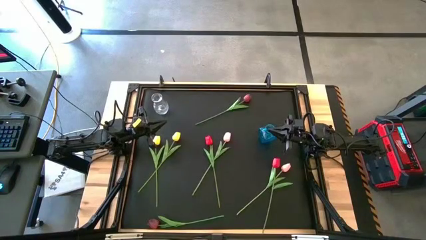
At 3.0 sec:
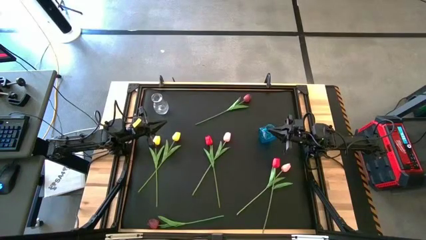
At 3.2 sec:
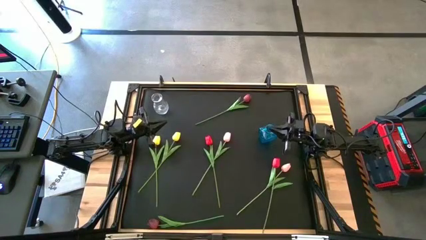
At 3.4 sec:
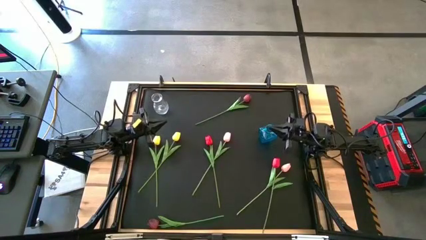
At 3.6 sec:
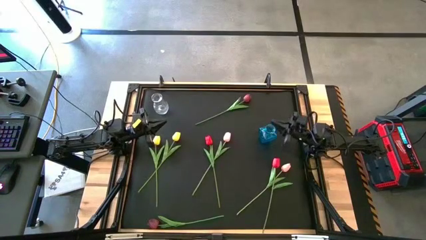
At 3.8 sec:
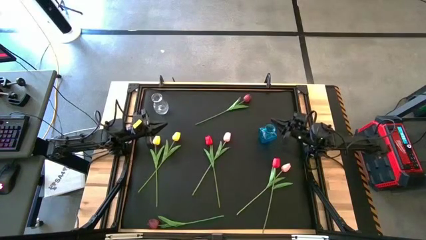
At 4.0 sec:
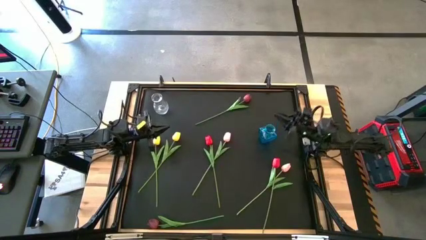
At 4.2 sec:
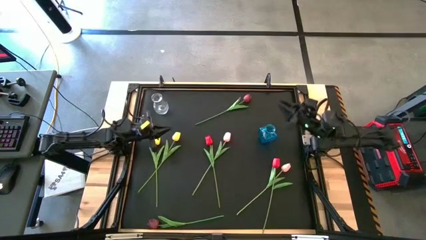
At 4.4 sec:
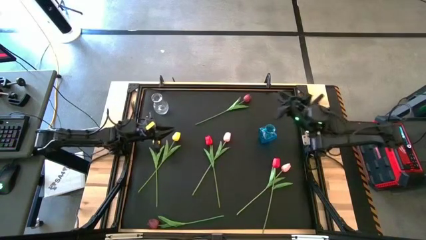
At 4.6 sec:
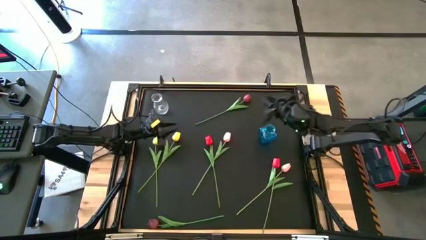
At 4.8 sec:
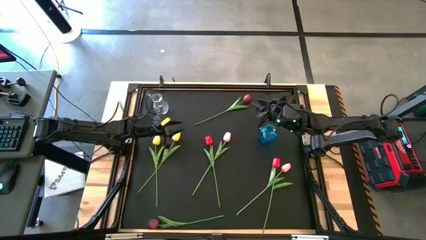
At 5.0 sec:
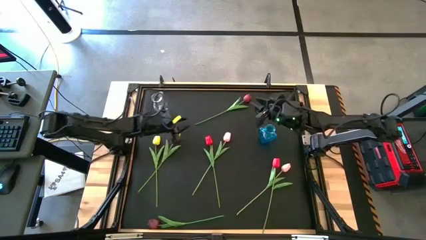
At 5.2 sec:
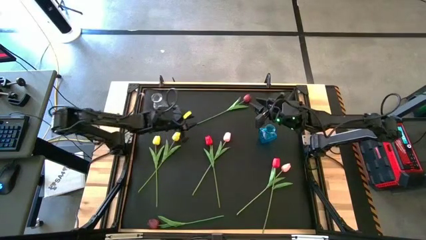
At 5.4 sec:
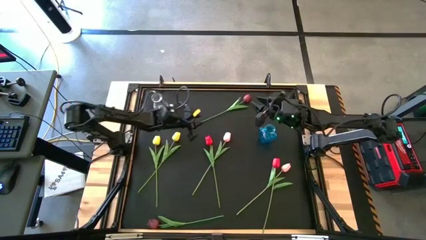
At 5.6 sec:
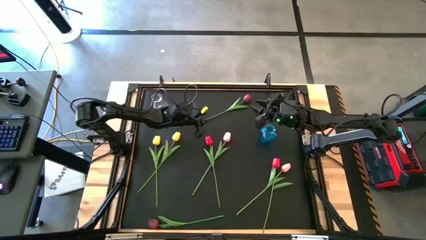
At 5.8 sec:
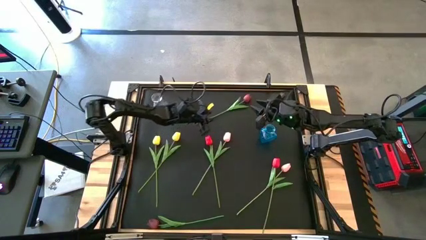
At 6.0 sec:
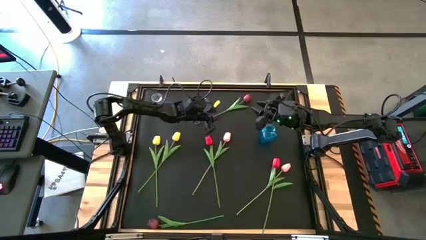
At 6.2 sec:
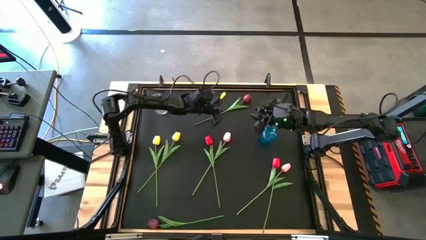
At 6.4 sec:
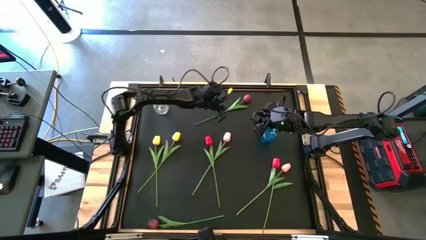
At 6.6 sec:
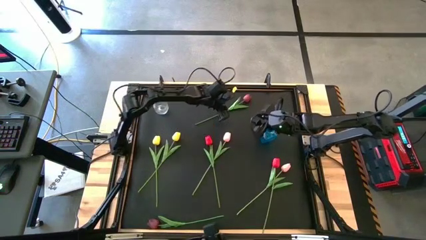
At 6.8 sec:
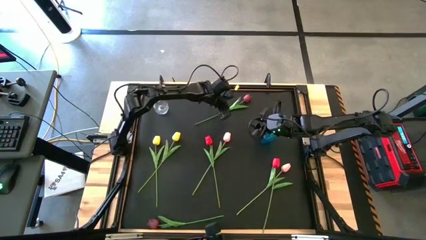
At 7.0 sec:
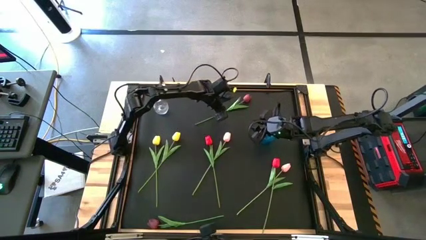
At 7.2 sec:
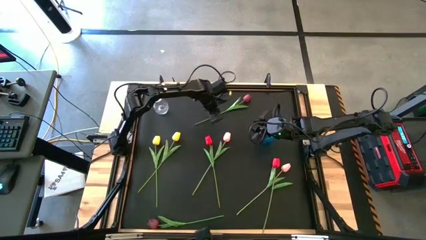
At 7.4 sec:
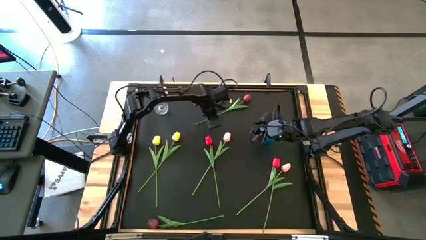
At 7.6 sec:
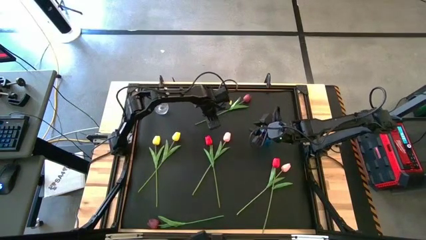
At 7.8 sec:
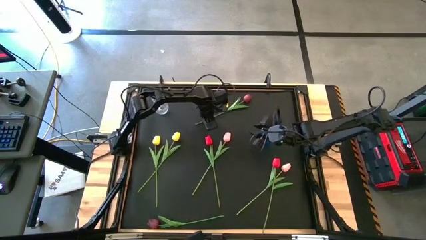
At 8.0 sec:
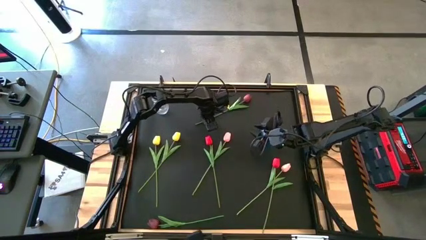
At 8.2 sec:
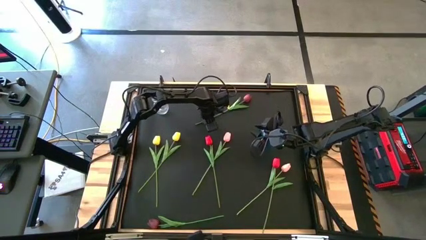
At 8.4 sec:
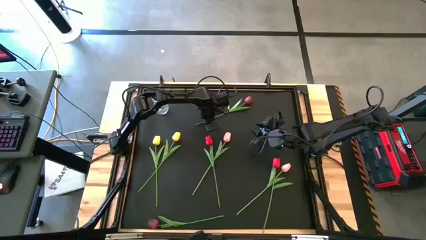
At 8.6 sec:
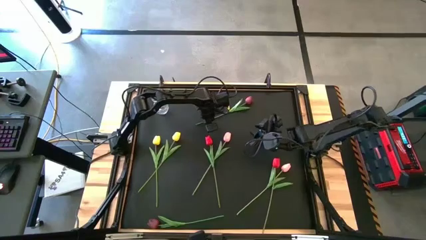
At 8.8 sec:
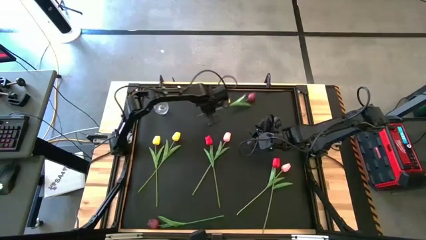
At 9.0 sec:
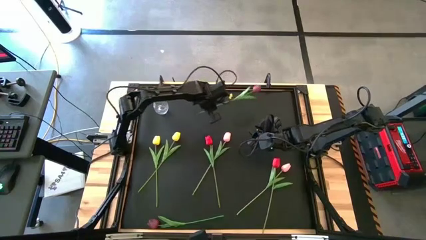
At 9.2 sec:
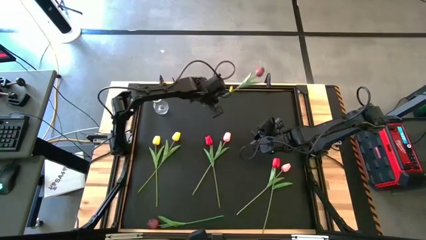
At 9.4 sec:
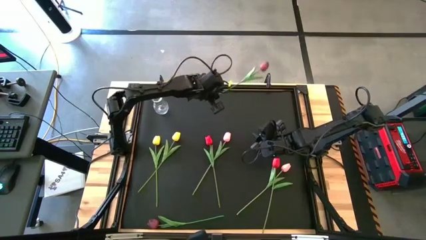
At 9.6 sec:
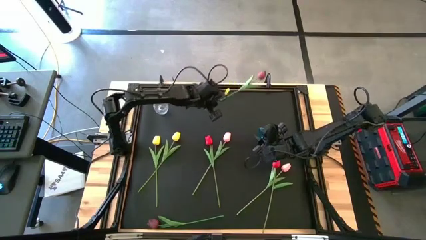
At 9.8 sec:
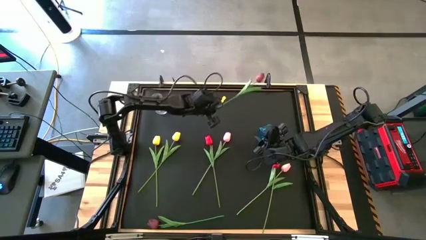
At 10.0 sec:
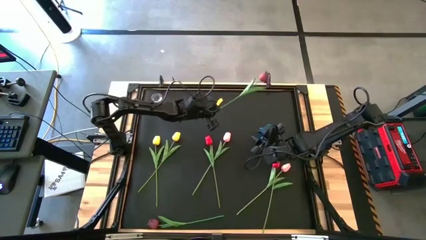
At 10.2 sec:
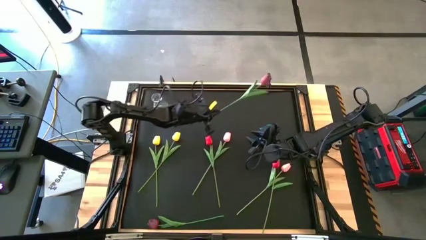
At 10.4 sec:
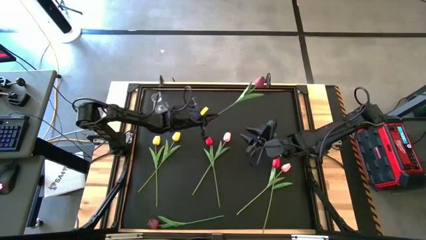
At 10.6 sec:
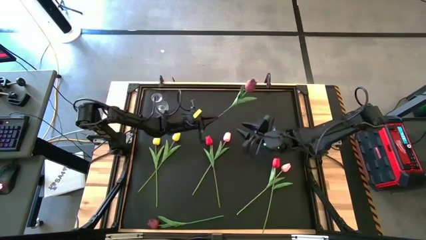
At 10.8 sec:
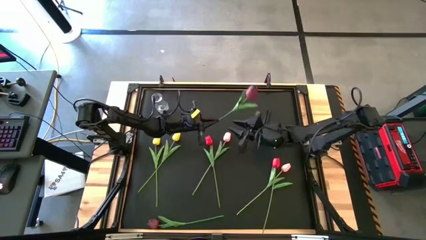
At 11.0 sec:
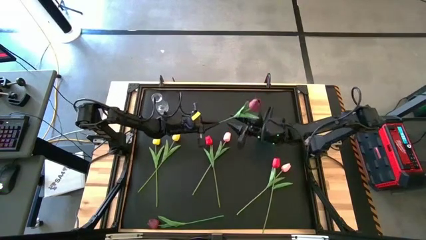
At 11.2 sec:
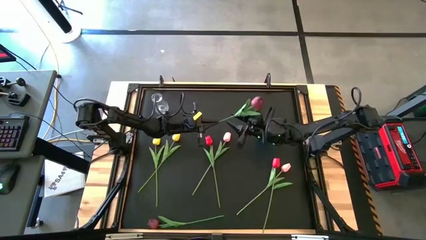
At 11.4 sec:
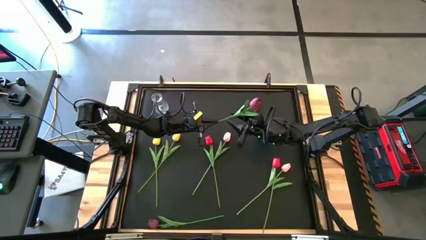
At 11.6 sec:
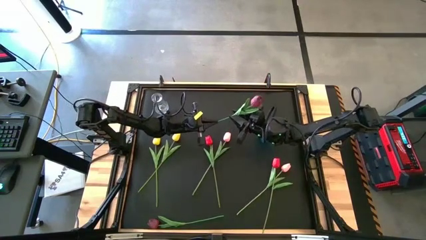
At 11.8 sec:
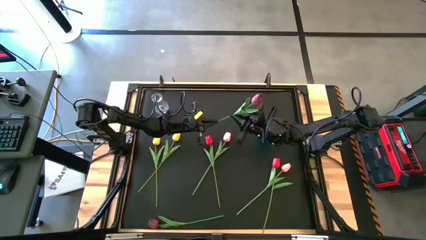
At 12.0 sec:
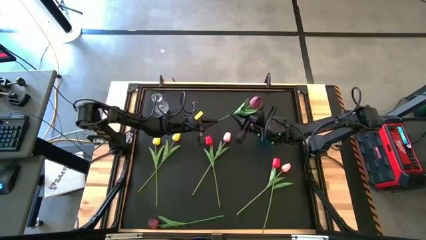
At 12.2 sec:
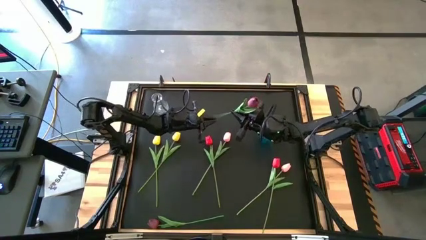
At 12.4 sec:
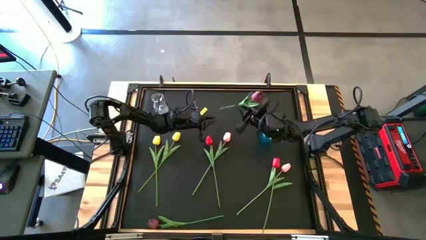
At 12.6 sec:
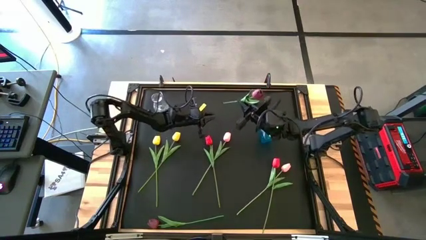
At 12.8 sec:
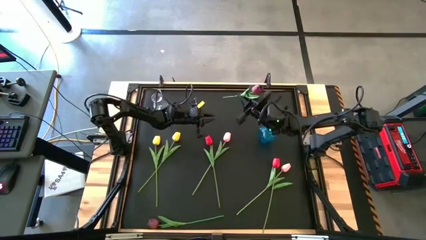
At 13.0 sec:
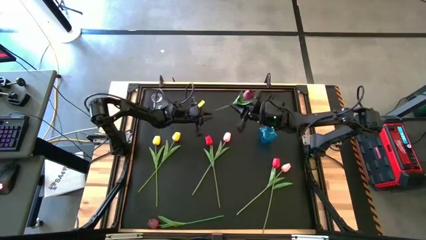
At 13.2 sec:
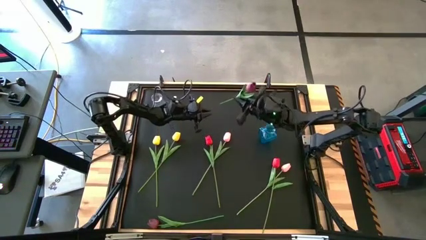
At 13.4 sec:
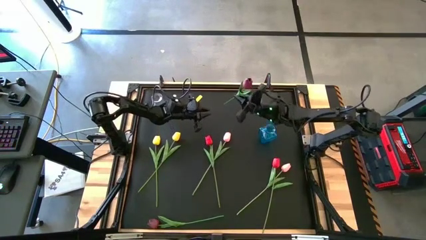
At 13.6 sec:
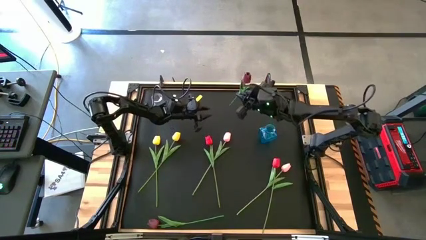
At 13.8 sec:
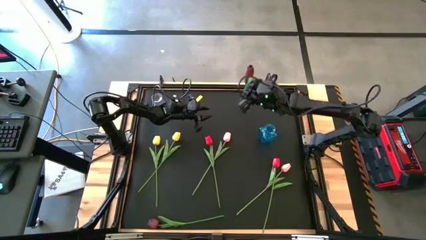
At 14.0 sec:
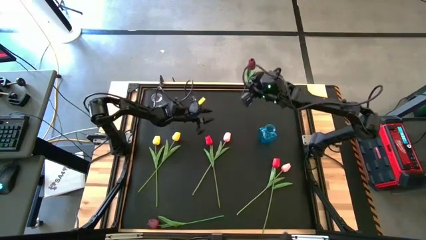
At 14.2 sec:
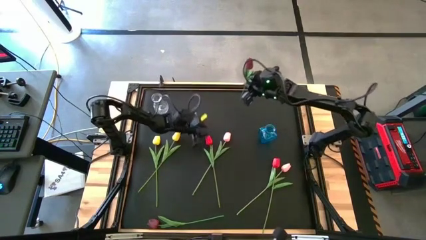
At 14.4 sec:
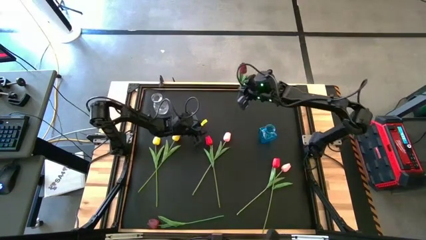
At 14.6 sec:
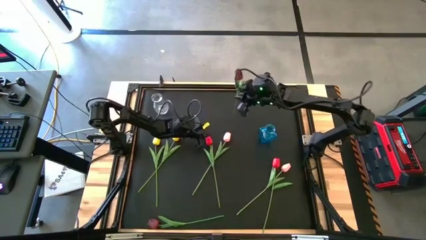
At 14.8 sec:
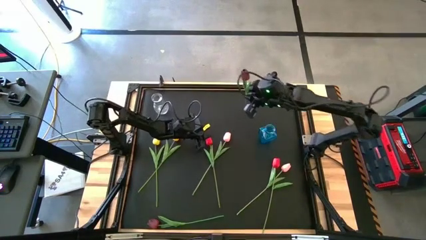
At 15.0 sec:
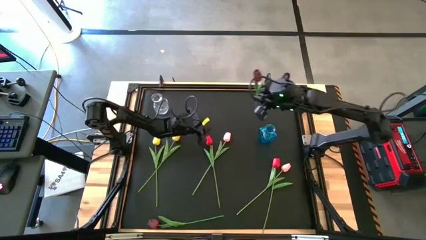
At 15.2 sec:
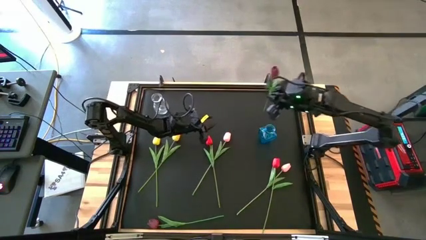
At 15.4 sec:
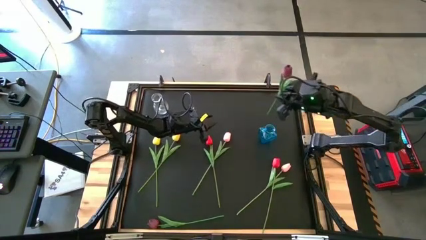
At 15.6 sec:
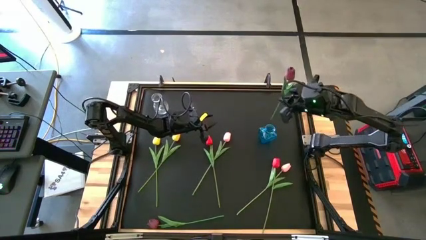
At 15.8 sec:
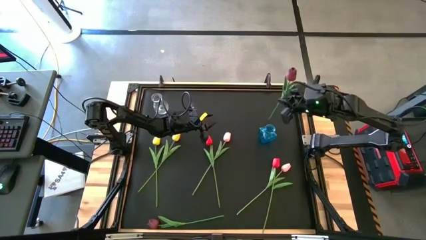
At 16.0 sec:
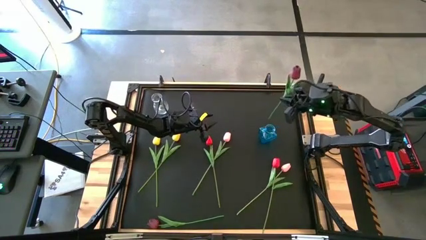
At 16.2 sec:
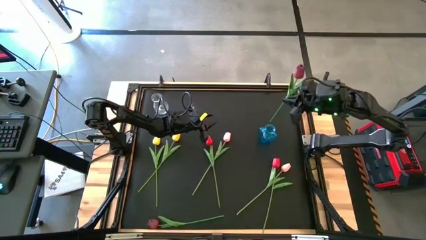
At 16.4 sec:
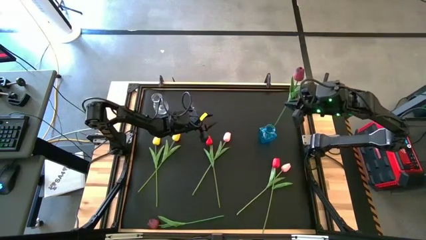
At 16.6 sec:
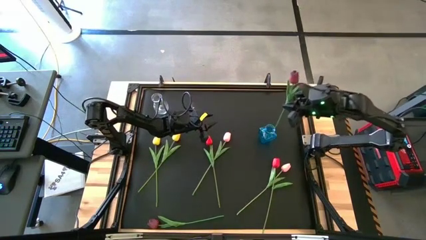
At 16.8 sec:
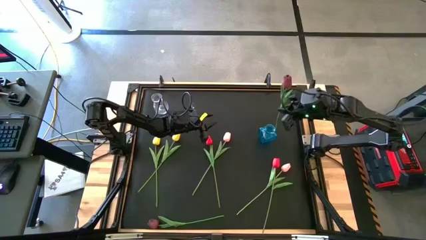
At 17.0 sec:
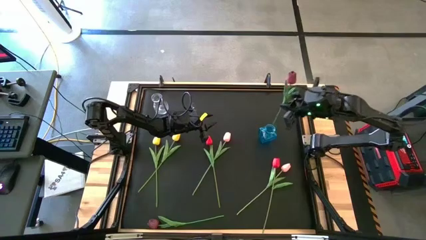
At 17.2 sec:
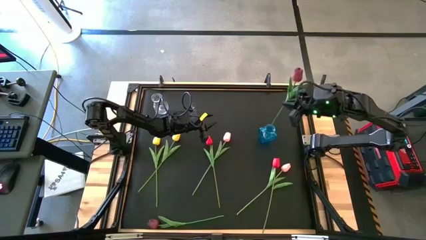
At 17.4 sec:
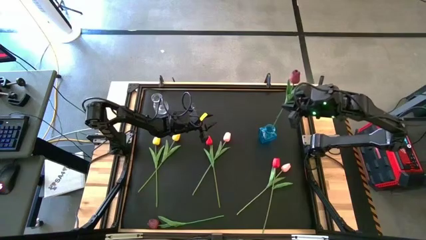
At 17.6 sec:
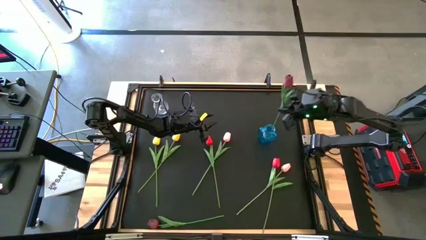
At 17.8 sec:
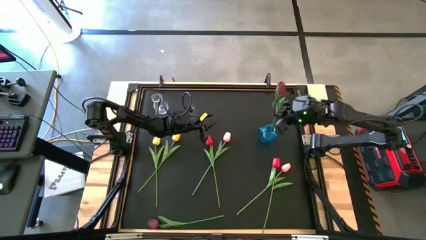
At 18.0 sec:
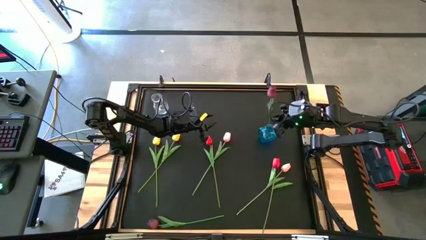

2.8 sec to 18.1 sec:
Task: Sort flowers into vase by color
Put the top dark red flower into the blue vase
